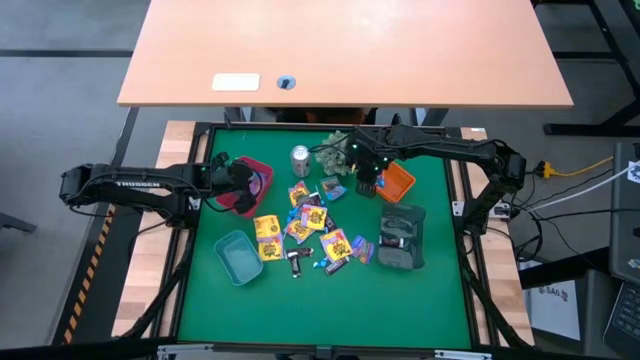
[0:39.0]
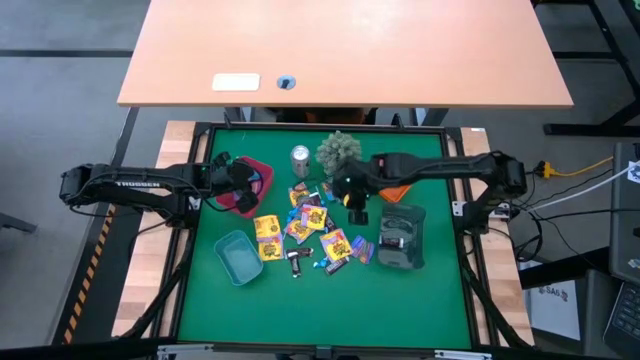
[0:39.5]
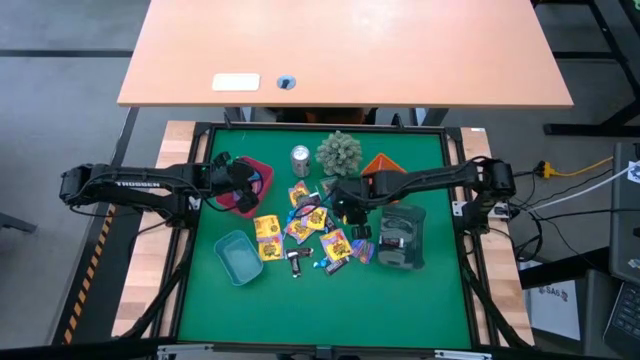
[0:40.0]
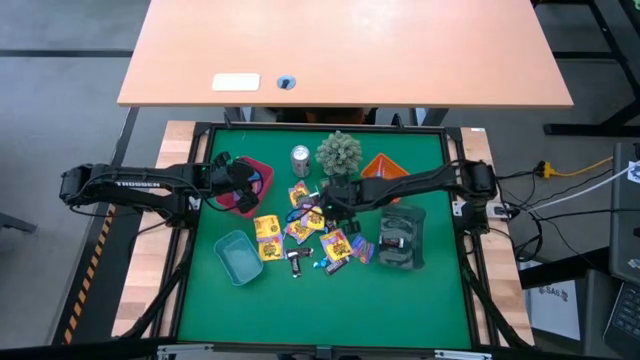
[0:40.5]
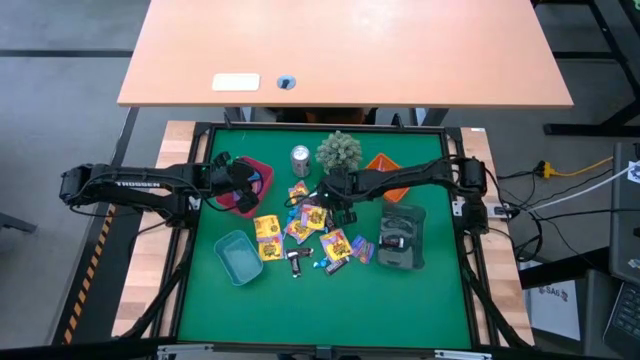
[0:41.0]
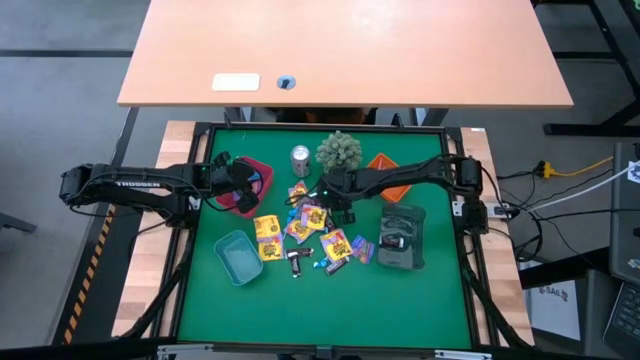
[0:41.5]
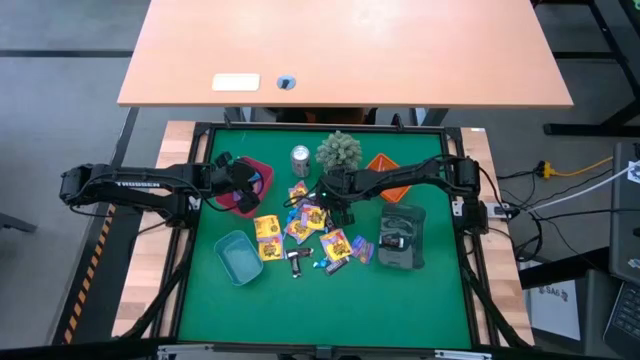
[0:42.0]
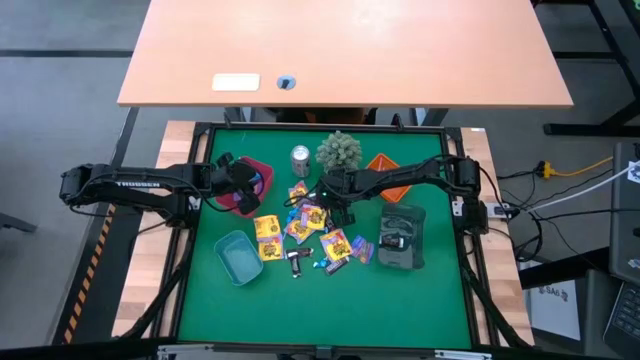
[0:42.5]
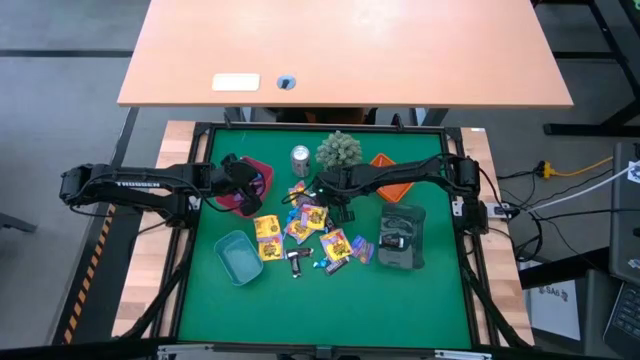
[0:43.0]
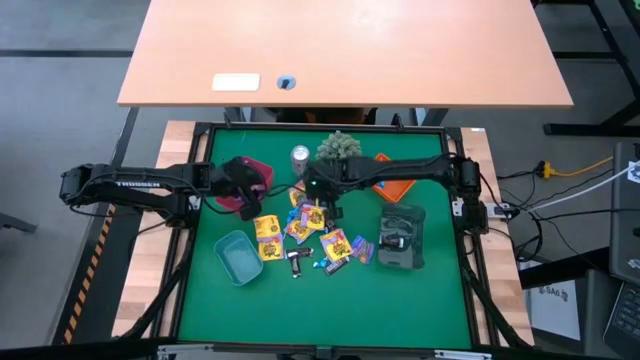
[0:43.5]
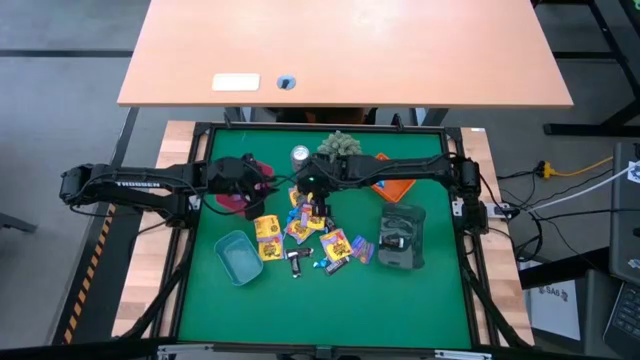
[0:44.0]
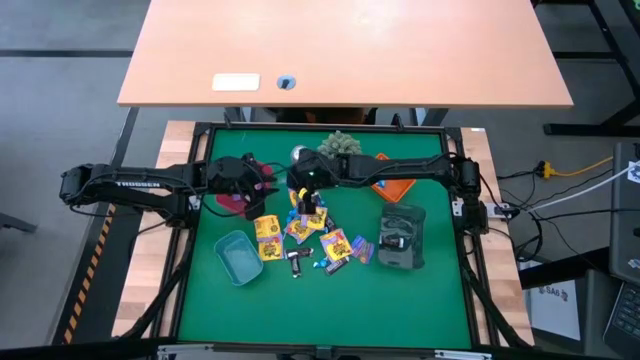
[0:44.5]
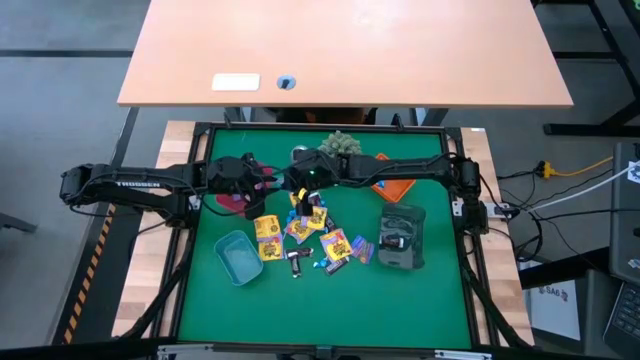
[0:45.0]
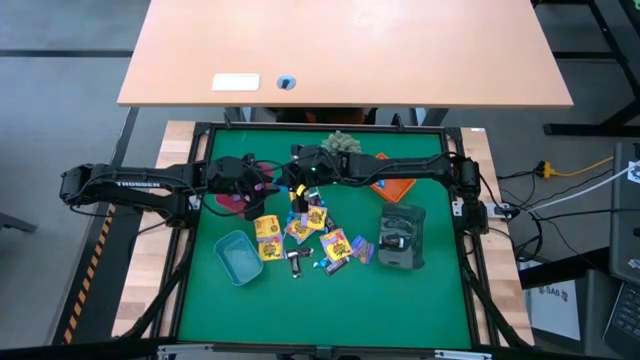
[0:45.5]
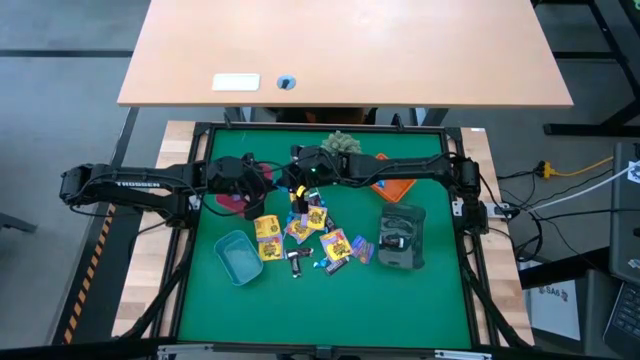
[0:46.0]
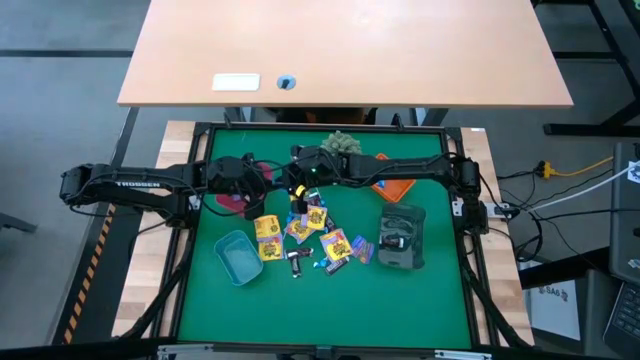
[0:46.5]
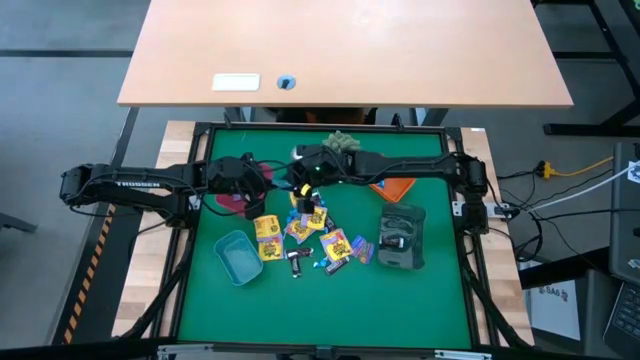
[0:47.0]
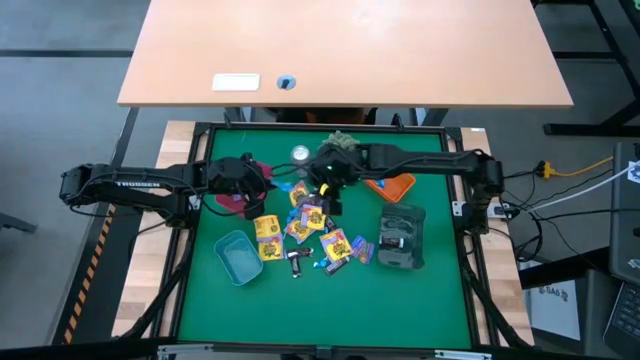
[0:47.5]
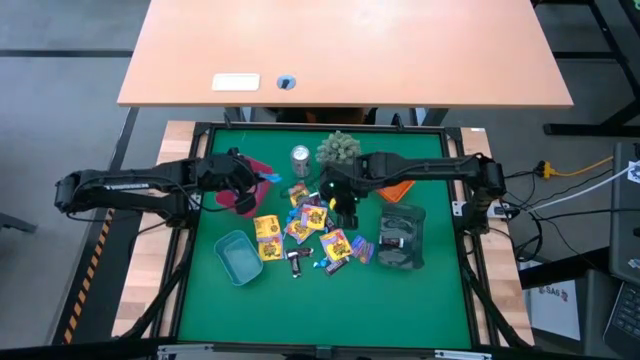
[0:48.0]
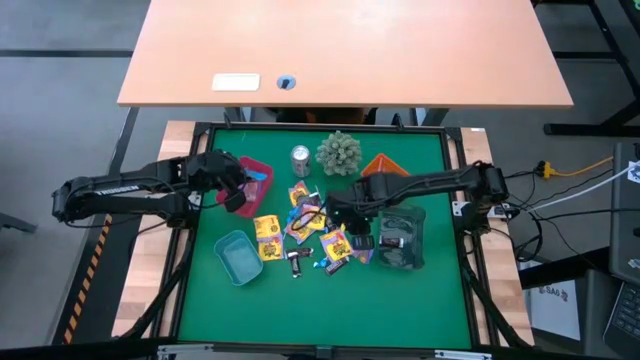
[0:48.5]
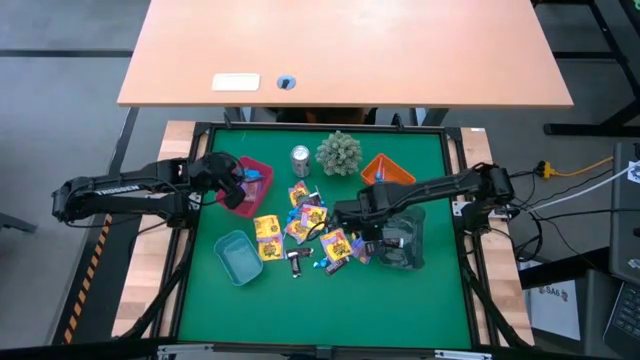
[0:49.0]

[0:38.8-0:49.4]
Task: Sort candy
Put the blue gummy into the red transparent bin

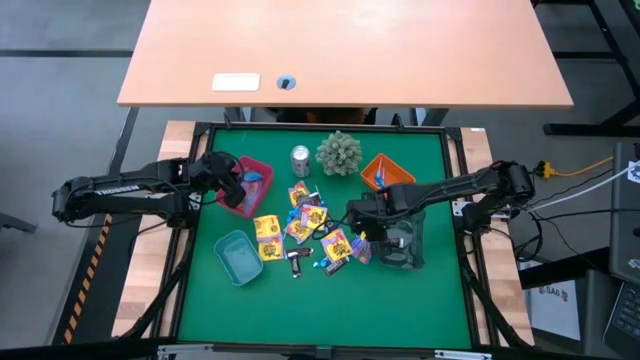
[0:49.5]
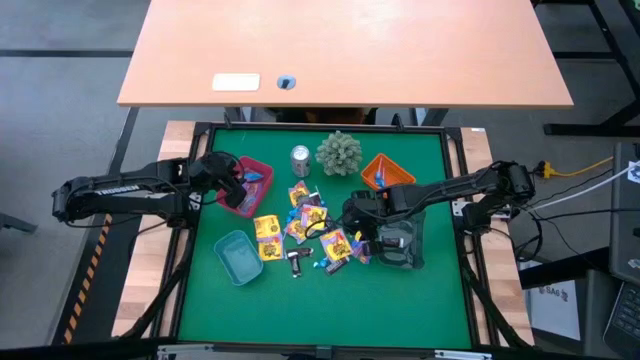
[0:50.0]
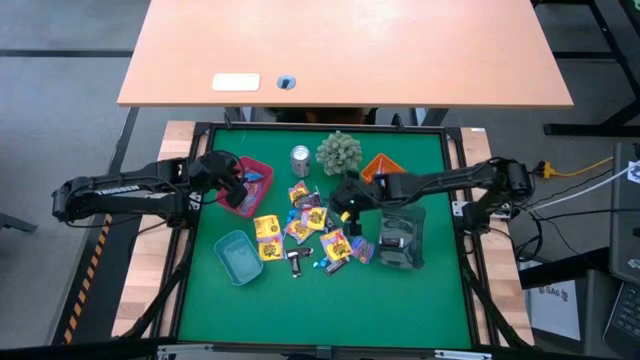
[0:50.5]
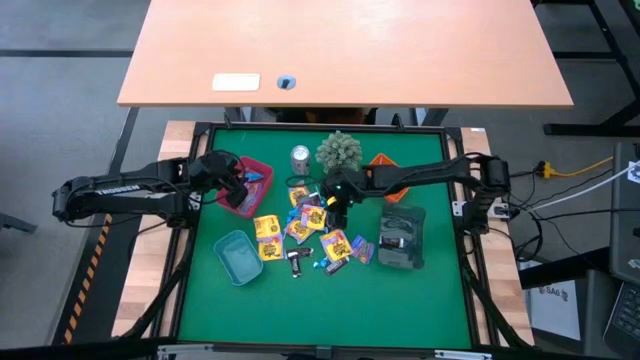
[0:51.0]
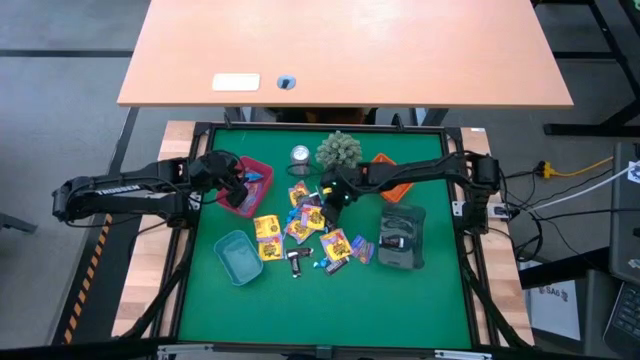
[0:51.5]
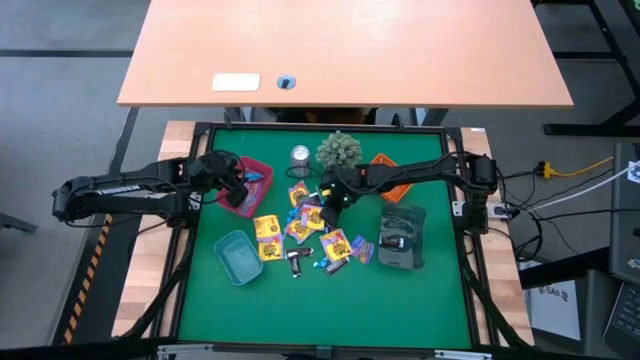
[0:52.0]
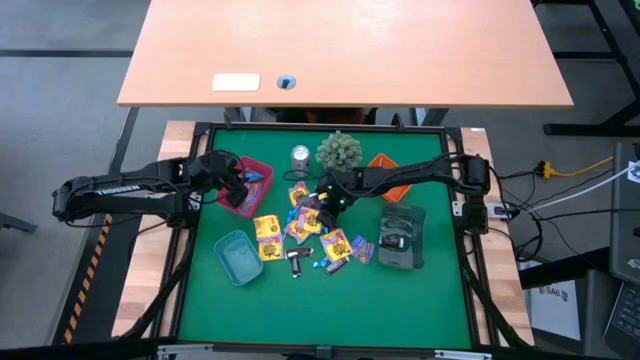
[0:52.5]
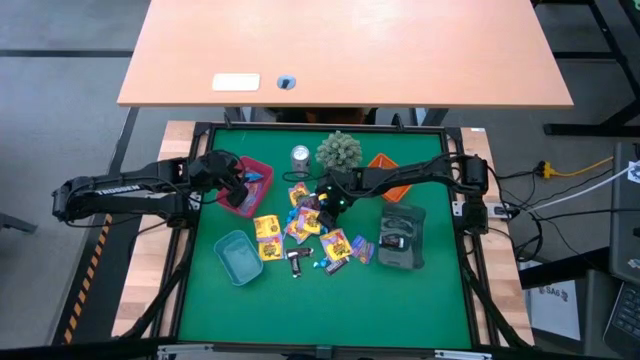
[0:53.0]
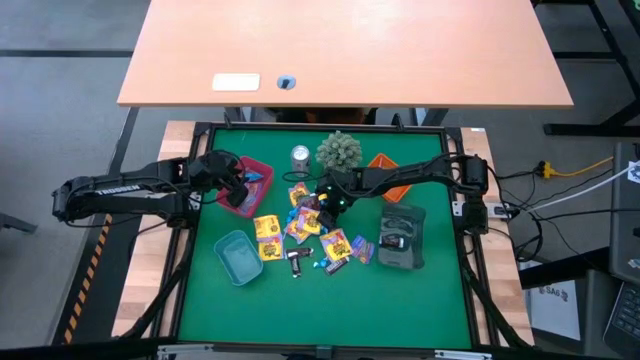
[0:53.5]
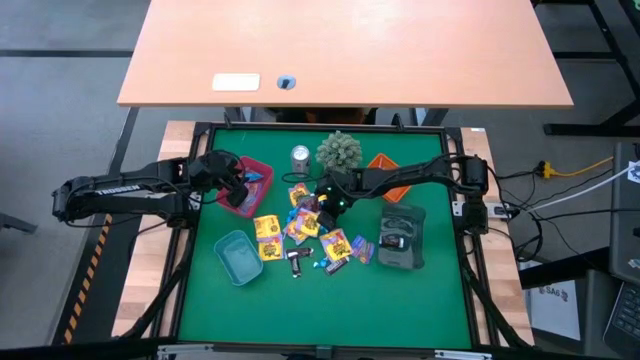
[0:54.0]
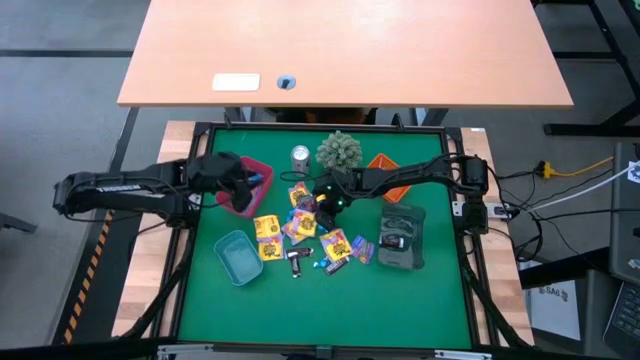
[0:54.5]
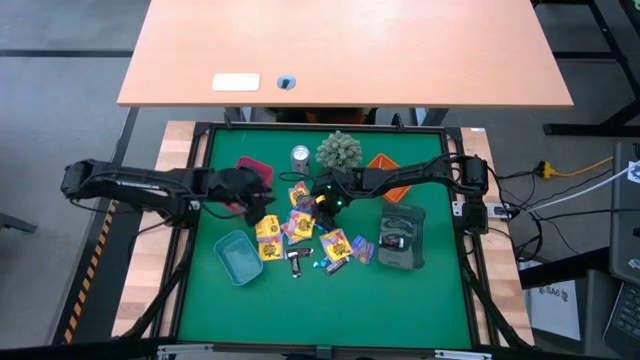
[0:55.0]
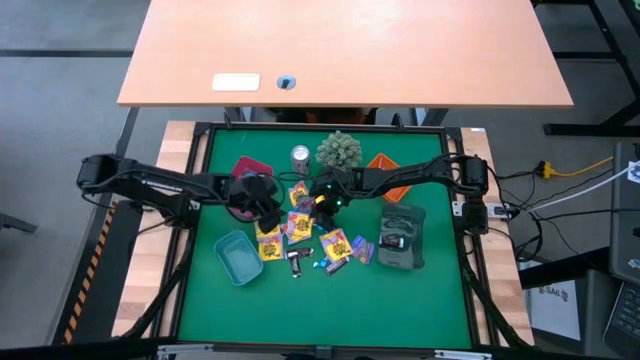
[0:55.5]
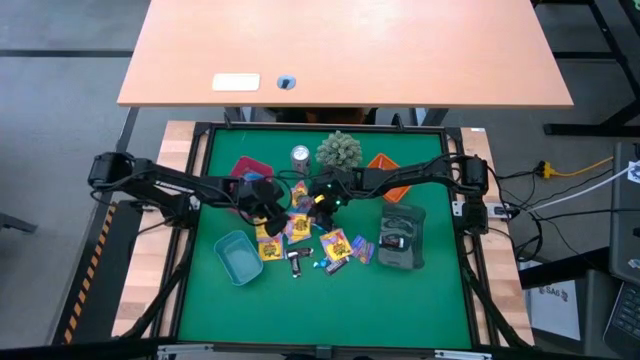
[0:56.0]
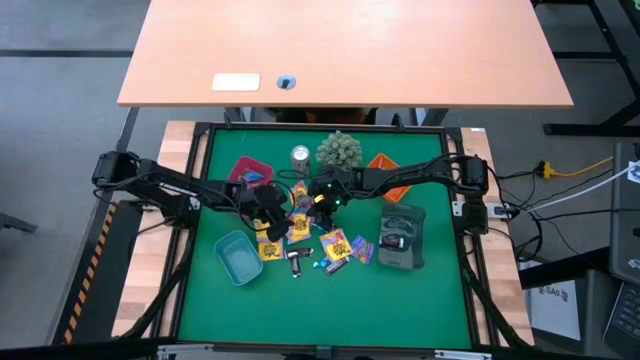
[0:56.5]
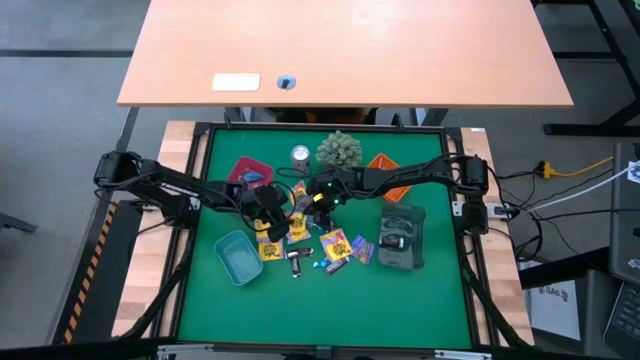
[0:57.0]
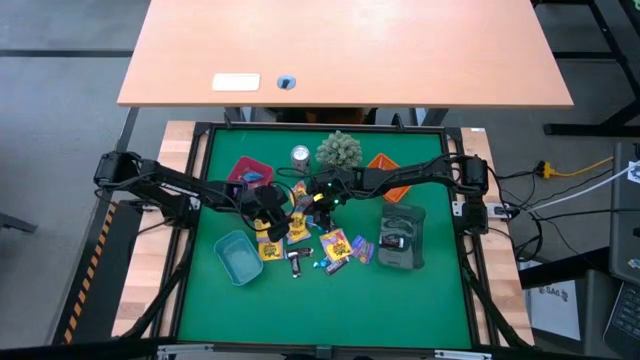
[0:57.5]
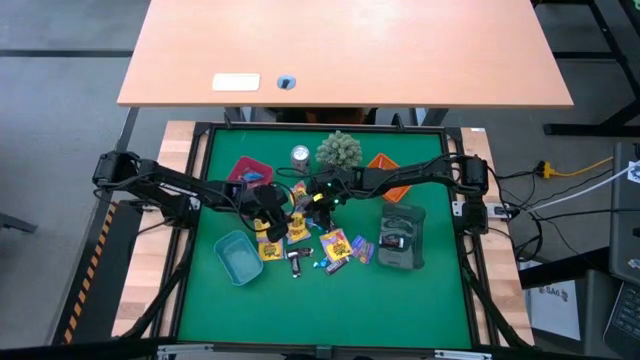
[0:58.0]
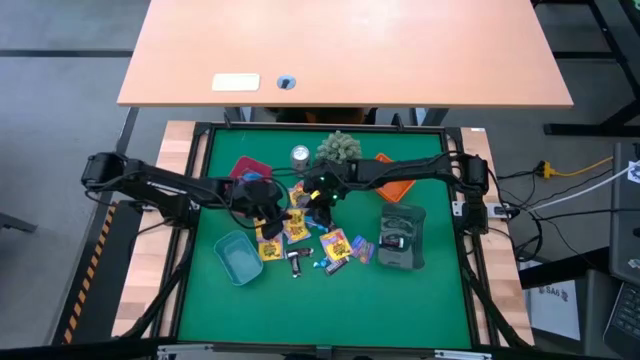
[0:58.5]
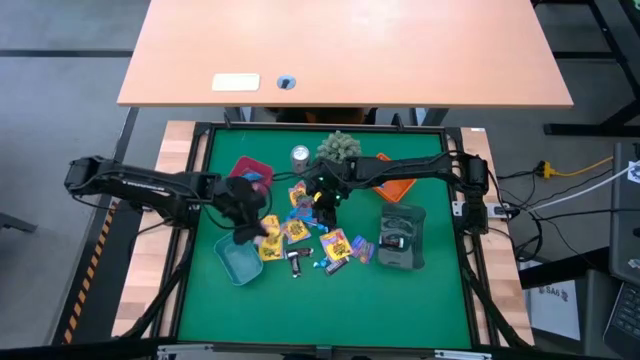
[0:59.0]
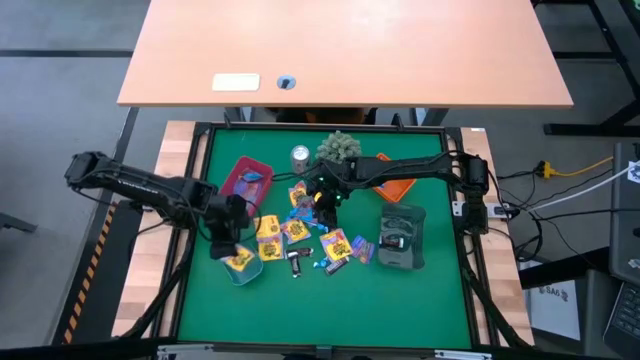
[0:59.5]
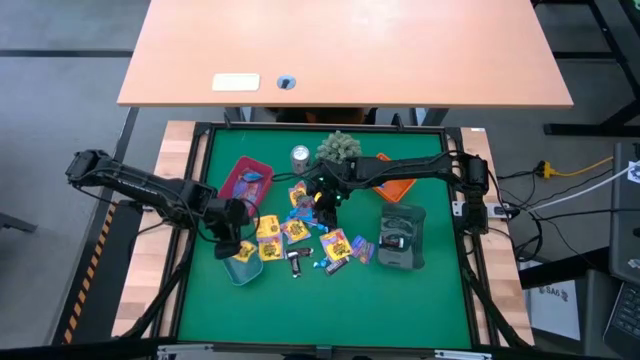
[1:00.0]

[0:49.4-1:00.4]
Put the yellow candy into the blue transparent bin

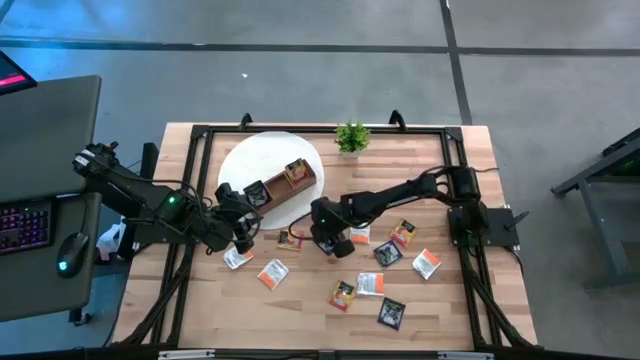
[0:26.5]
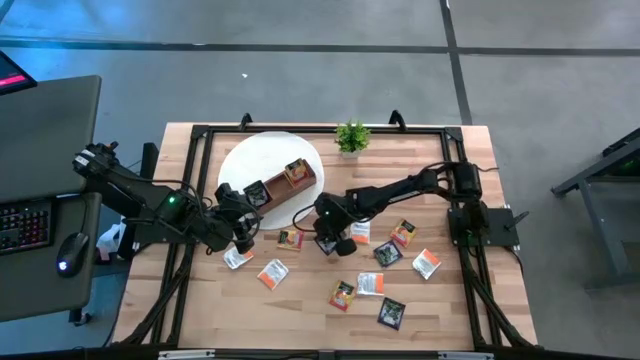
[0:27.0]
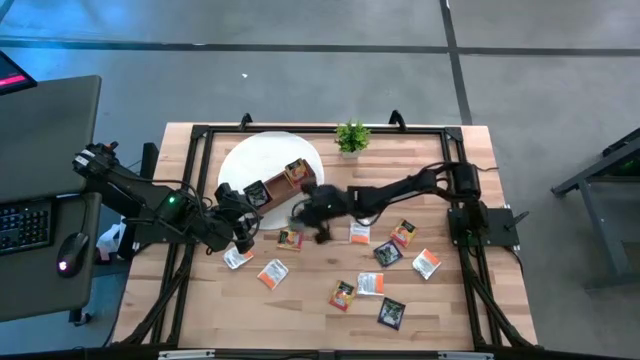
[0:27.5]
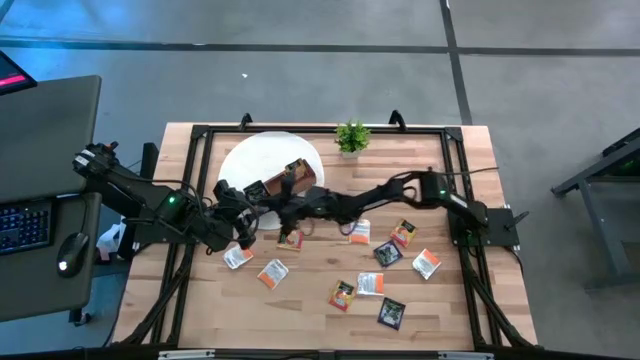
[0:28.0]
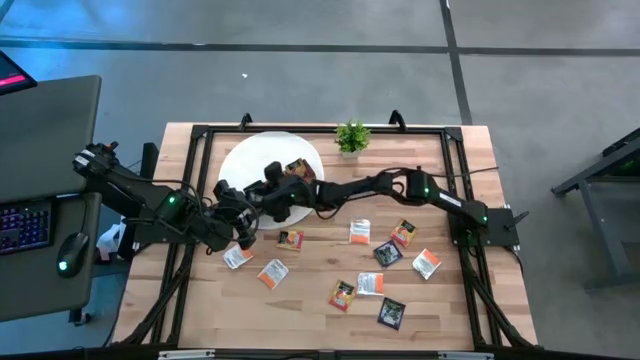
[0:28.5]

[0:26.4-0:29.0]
Task: Pick & Place Tea
Put the purple tea bag into the left section of the wooden organizer
